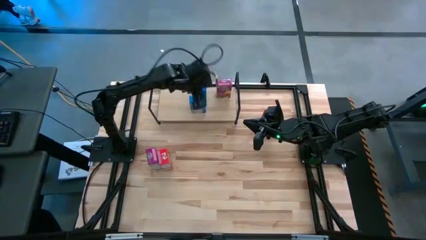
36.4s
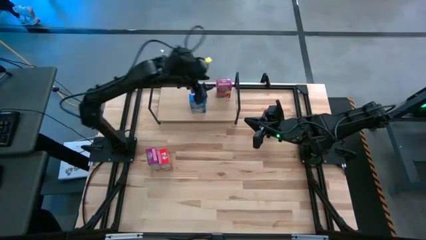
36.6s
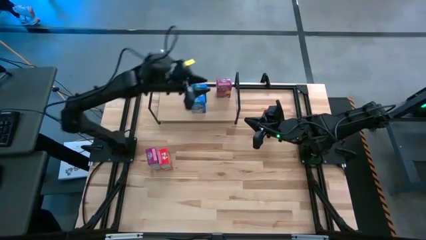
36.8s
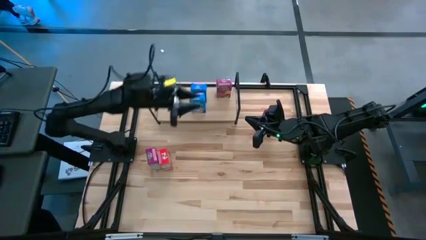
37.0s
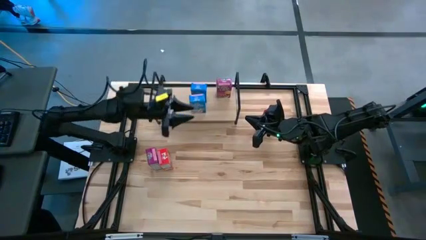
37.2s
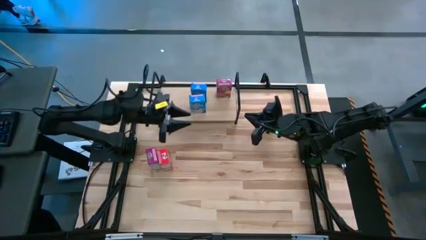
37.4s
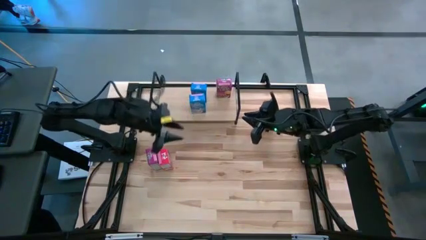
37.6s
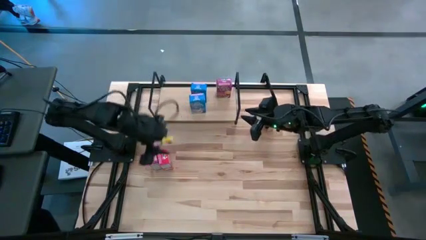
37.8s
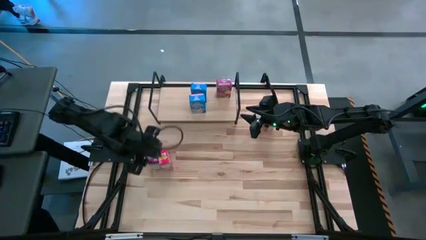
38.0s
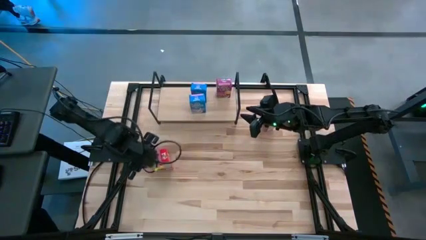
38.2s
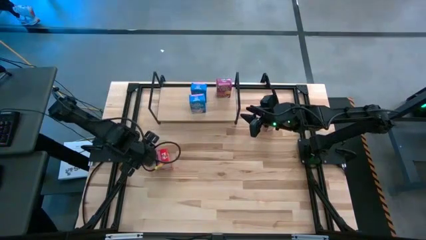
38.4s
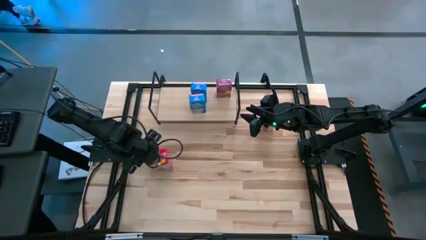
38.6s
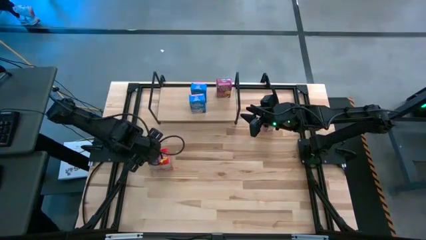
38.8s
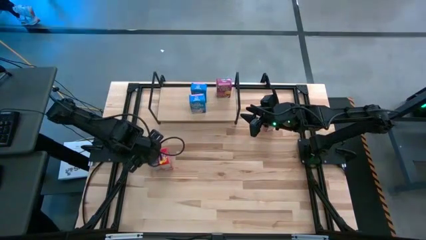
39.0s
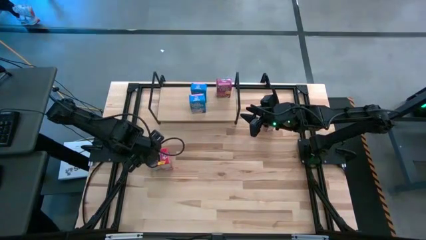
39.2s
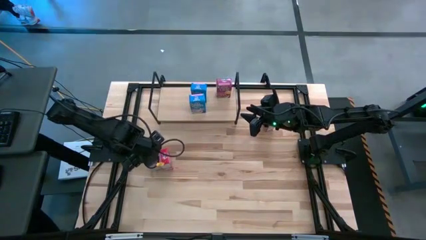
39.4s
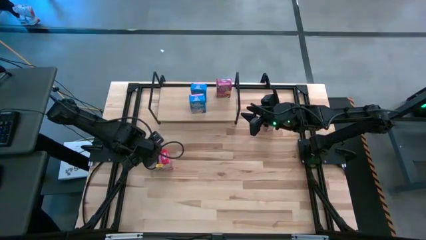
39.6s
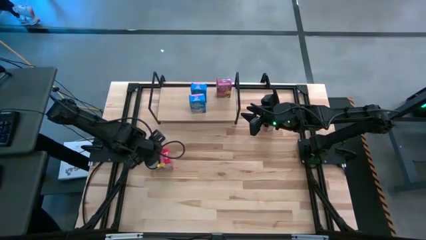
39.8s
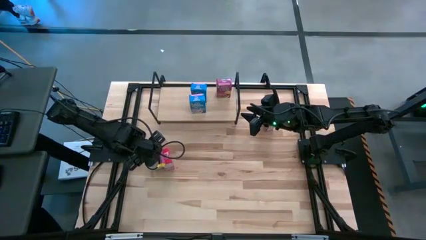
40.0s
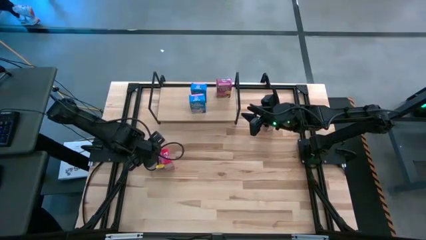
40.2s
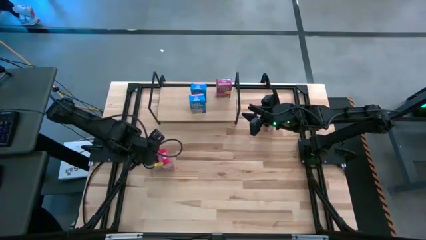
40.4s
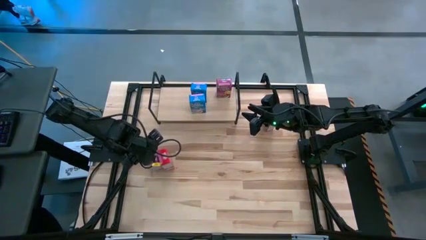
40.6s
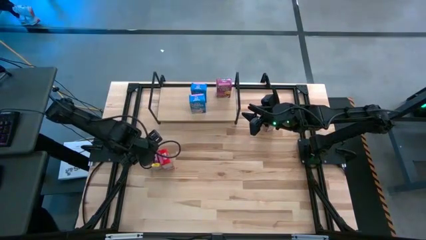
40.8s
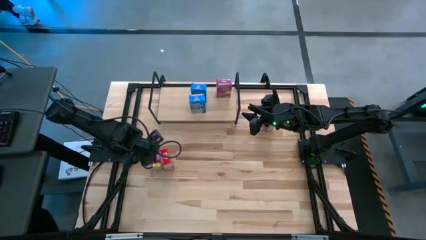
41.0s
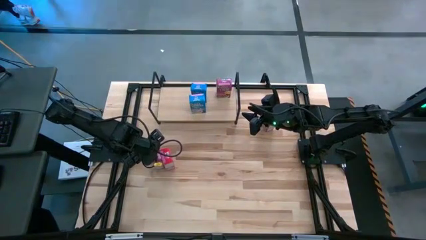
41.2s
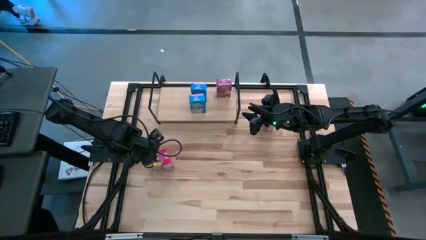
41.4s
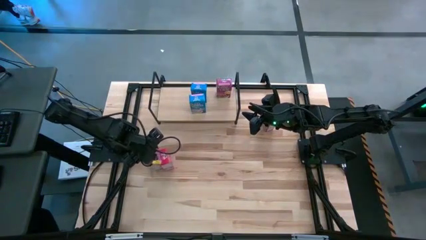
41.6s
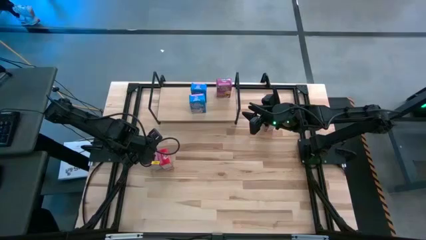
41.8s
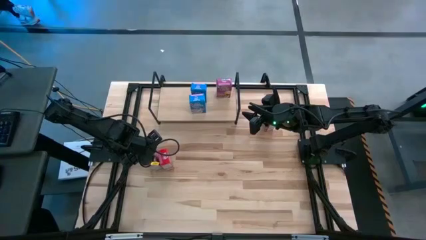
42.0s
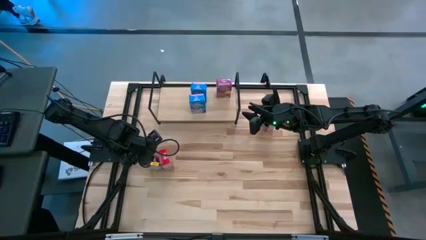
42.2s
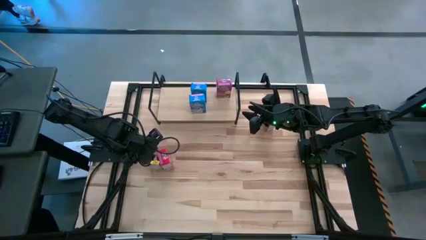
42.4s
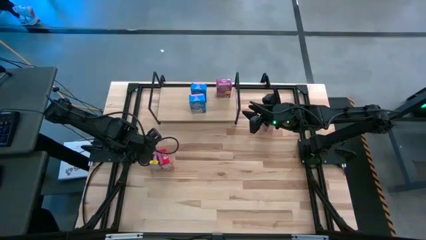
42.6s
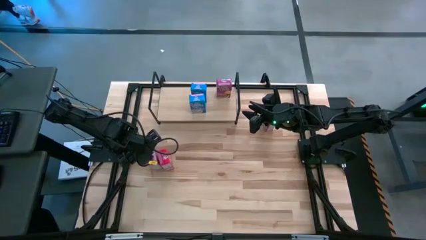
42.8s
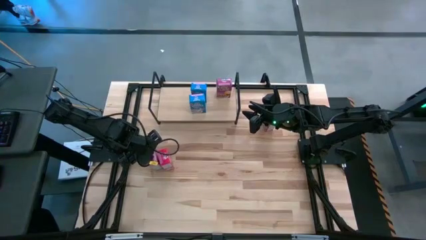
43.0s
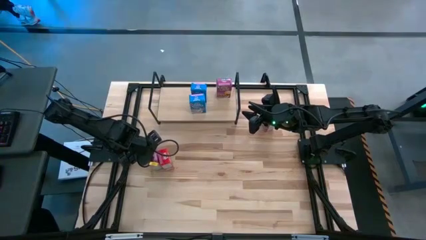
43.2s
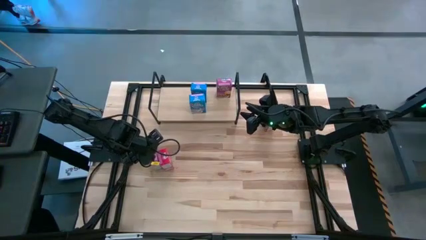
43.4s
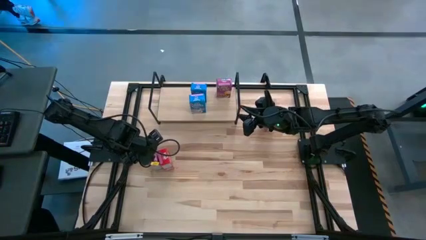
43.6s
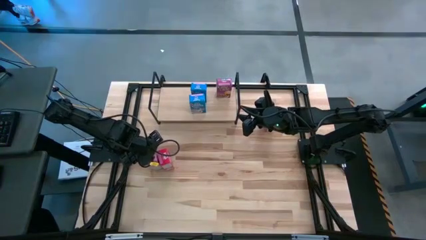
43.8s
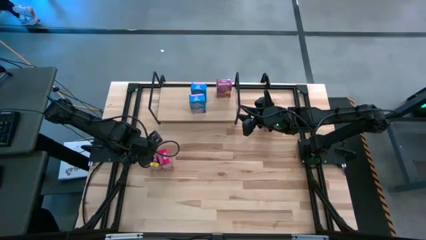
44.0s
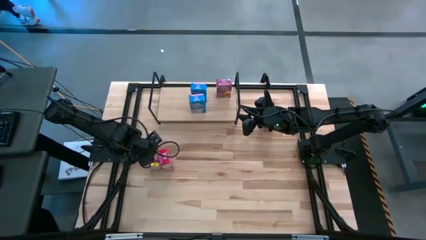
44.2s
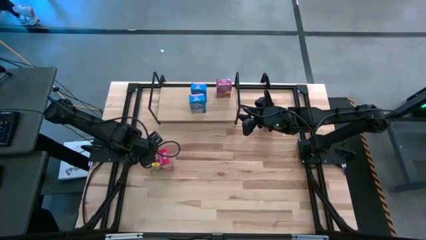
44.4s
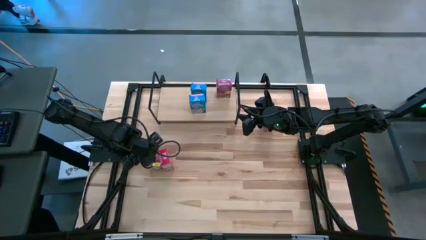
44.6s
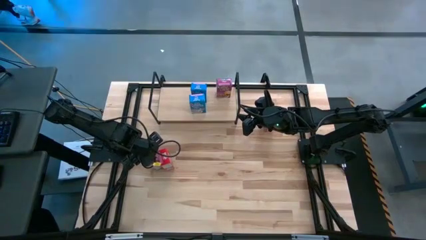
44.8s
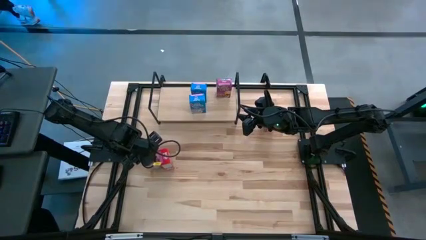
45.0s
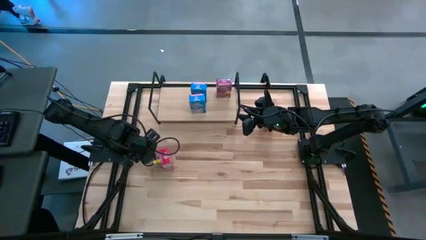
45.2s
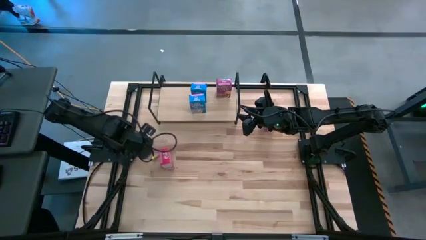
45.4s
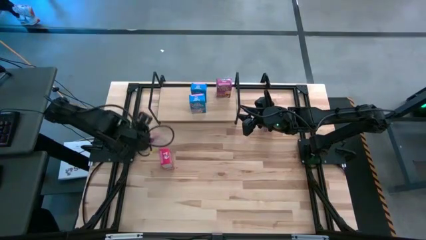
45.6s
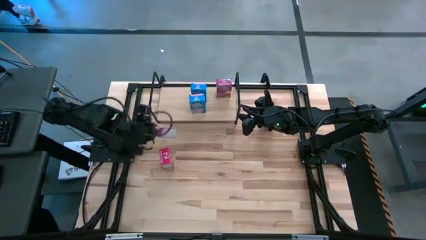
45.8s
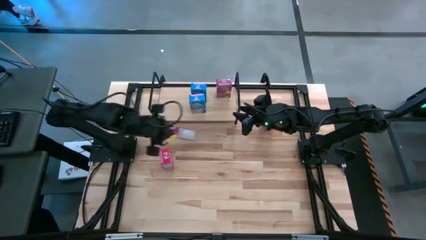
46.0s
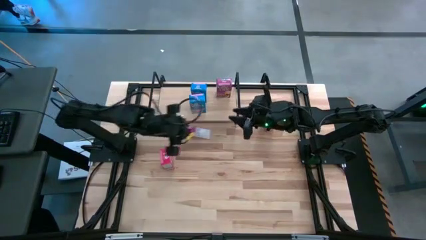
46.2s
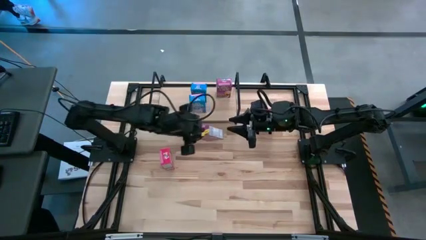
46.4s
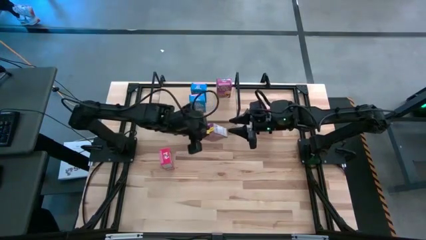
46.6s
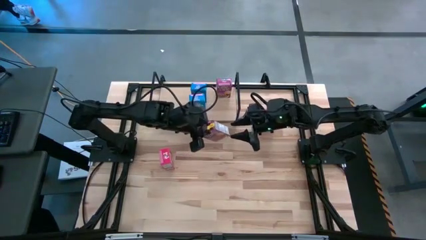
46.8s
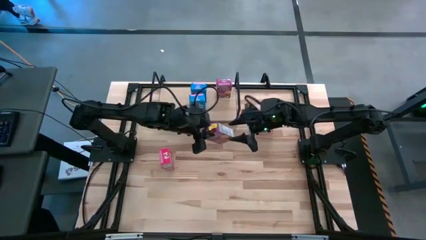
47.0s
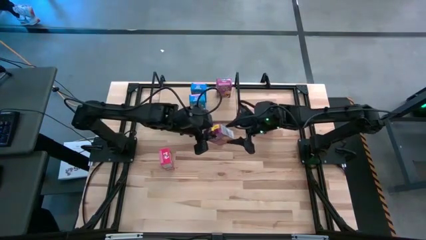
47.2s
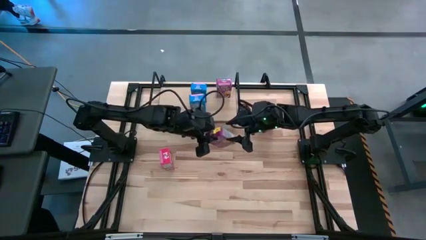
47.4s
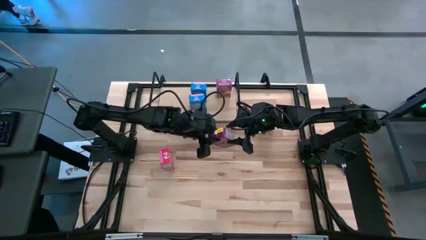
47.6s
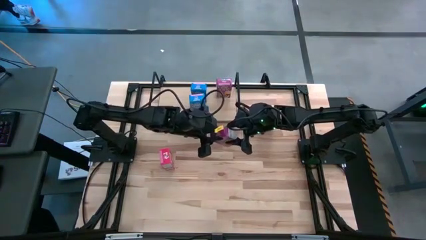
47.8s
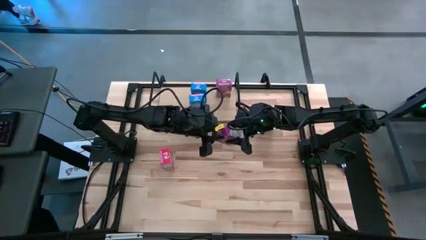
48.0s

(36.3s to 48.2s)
Task: Stack cereal on shelf
Put the purple cereal box on the shelf aligned with the other purple cereal box
